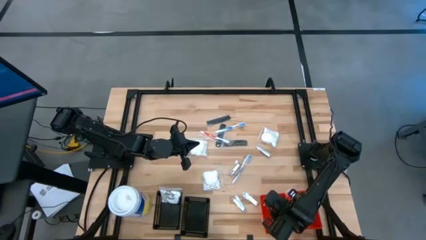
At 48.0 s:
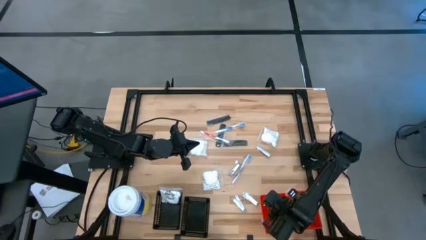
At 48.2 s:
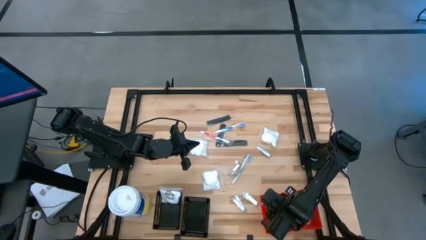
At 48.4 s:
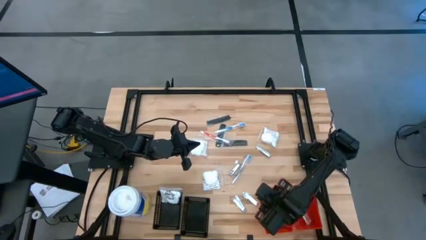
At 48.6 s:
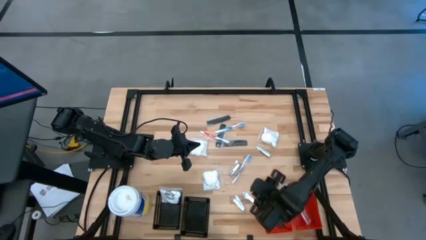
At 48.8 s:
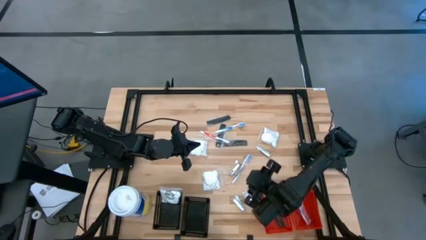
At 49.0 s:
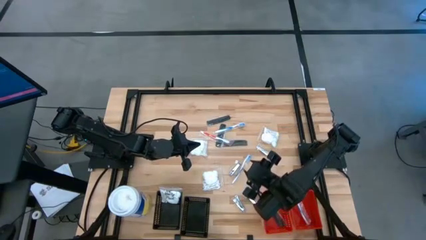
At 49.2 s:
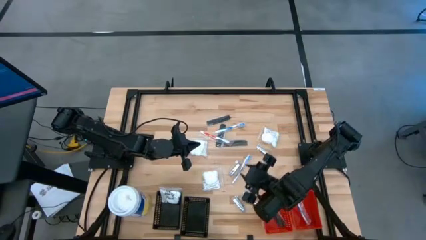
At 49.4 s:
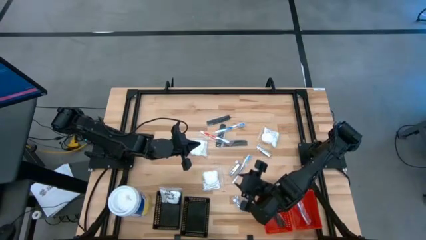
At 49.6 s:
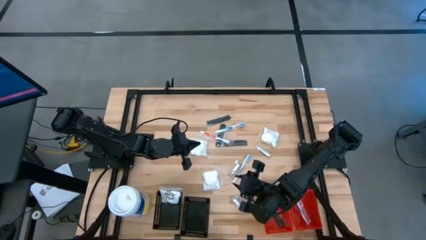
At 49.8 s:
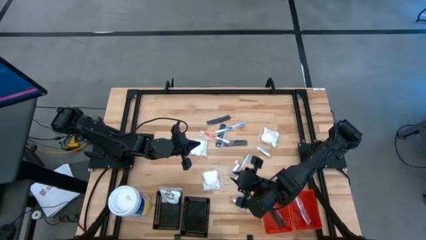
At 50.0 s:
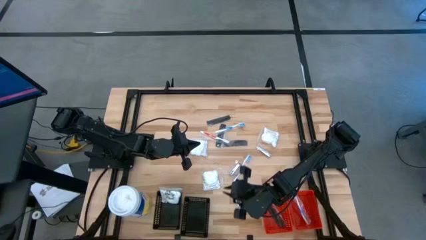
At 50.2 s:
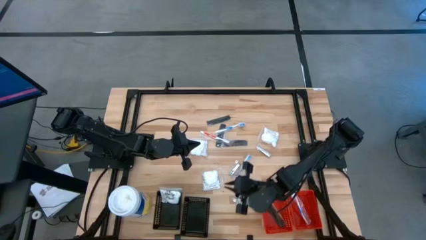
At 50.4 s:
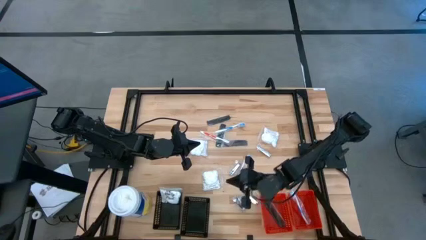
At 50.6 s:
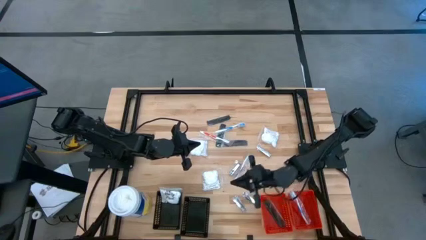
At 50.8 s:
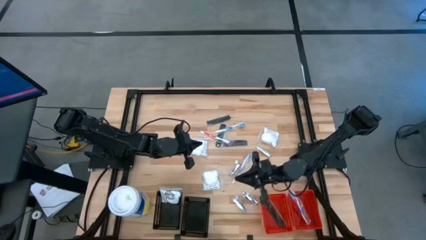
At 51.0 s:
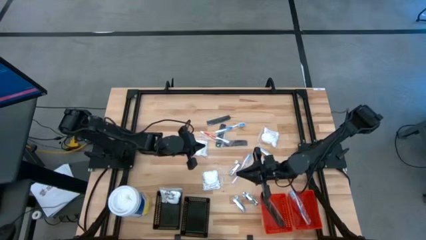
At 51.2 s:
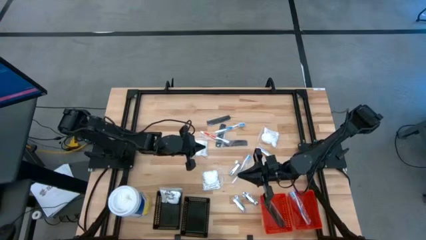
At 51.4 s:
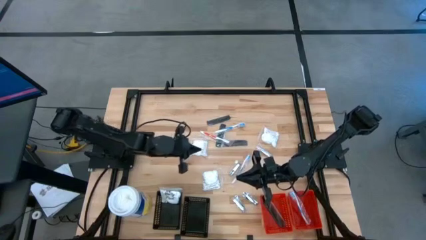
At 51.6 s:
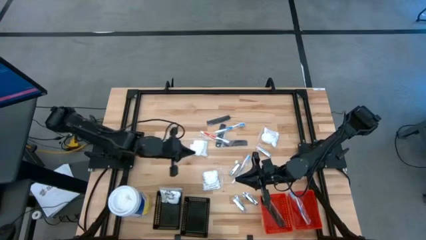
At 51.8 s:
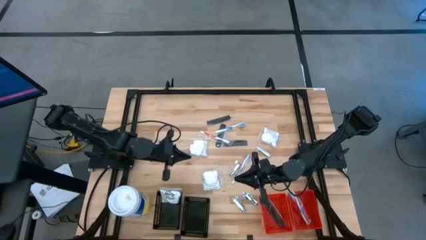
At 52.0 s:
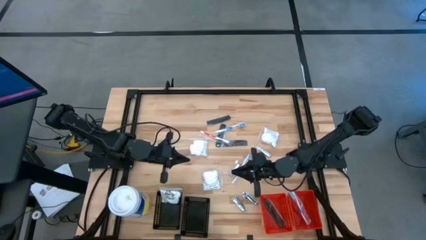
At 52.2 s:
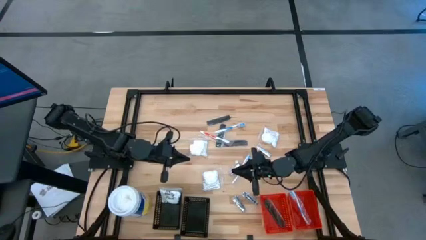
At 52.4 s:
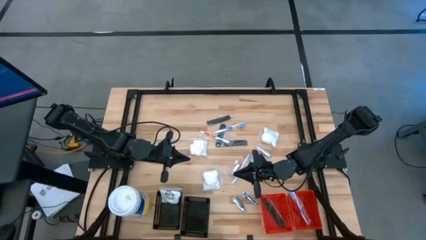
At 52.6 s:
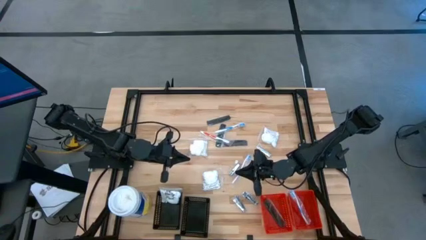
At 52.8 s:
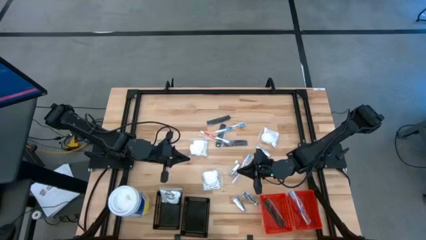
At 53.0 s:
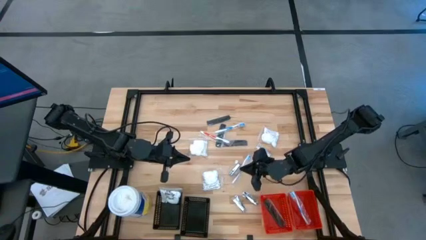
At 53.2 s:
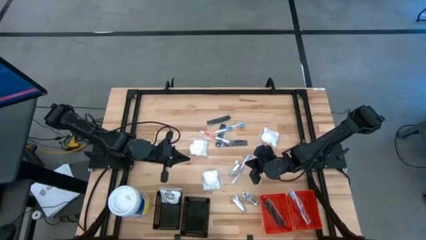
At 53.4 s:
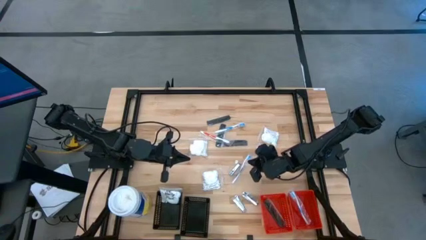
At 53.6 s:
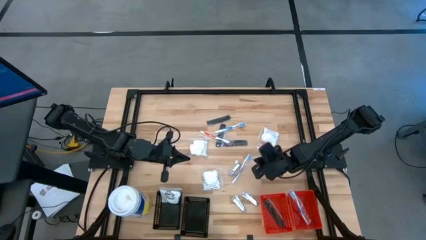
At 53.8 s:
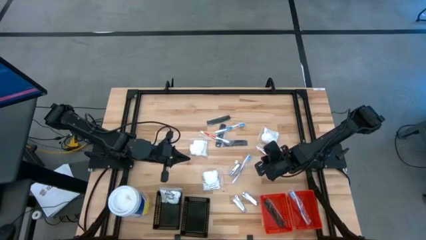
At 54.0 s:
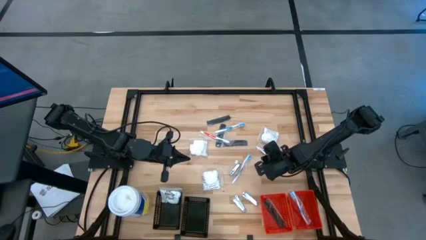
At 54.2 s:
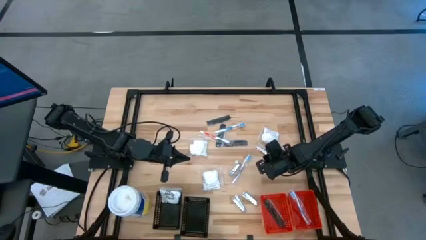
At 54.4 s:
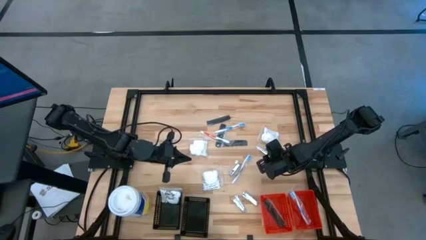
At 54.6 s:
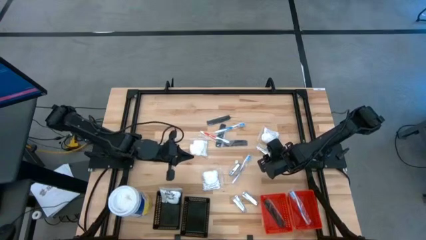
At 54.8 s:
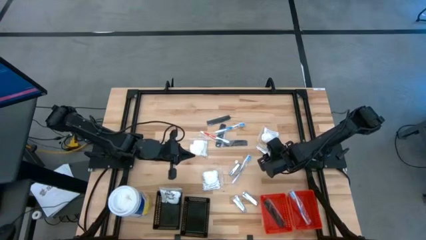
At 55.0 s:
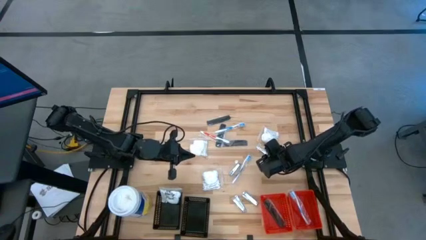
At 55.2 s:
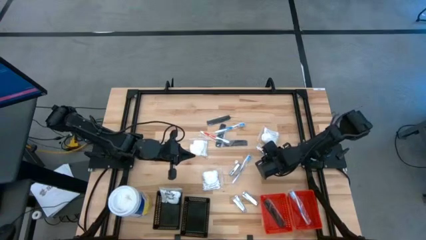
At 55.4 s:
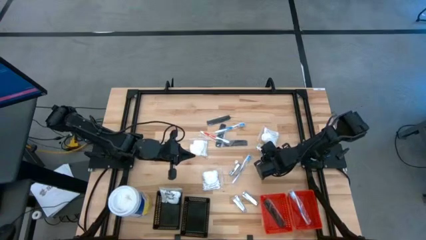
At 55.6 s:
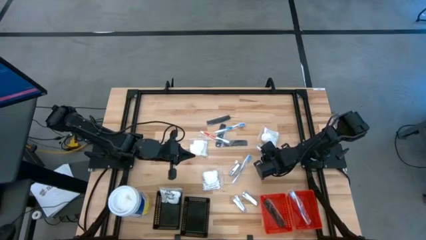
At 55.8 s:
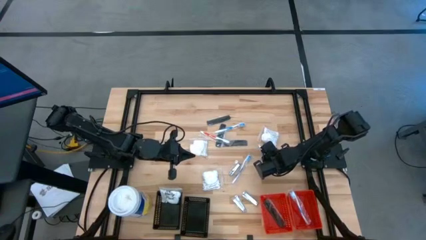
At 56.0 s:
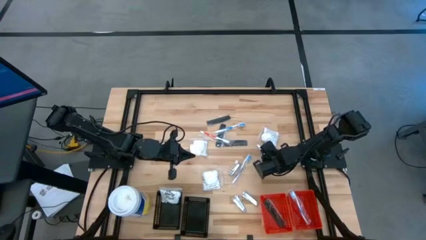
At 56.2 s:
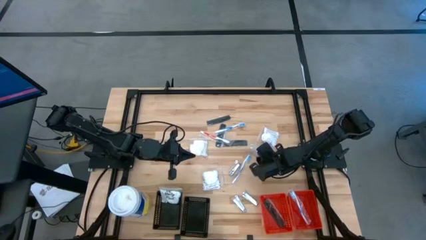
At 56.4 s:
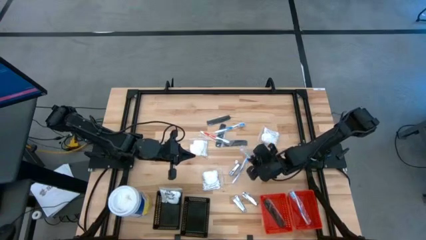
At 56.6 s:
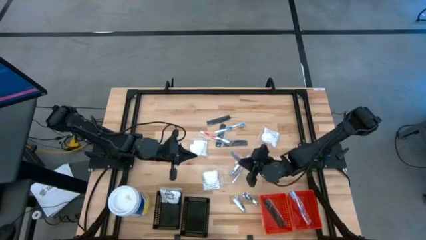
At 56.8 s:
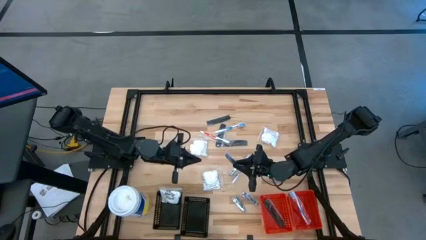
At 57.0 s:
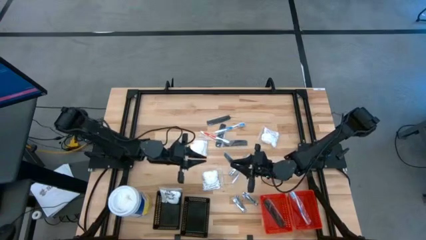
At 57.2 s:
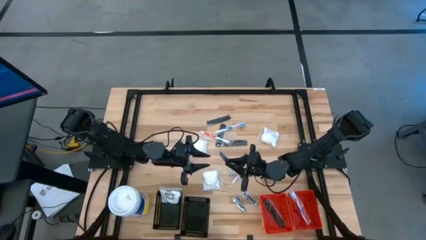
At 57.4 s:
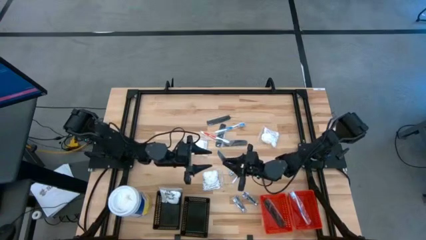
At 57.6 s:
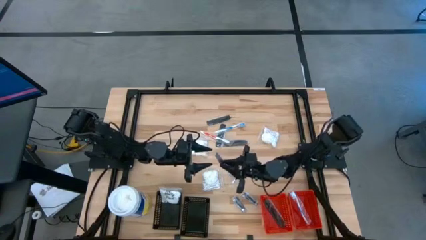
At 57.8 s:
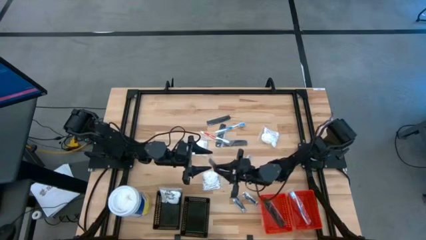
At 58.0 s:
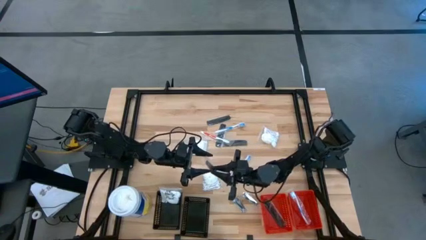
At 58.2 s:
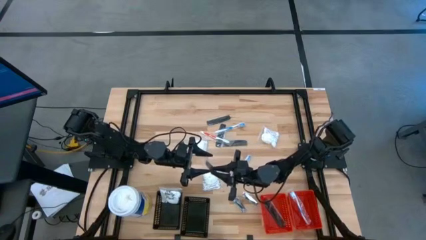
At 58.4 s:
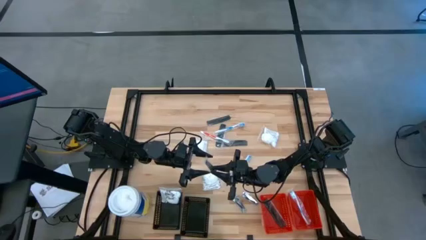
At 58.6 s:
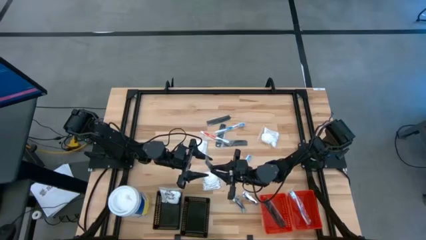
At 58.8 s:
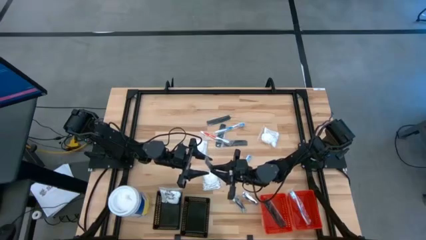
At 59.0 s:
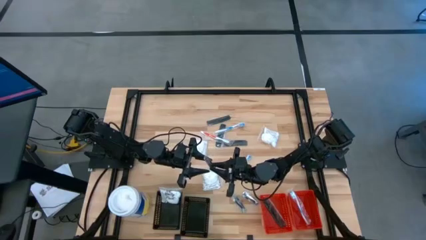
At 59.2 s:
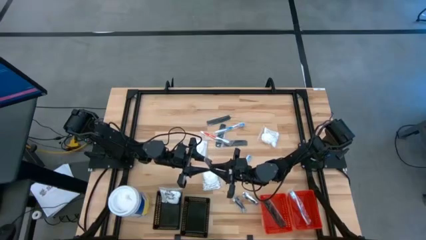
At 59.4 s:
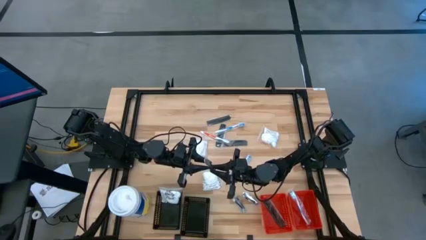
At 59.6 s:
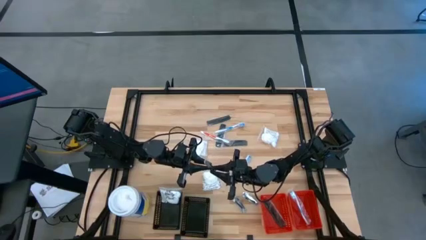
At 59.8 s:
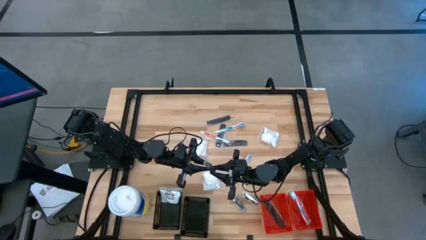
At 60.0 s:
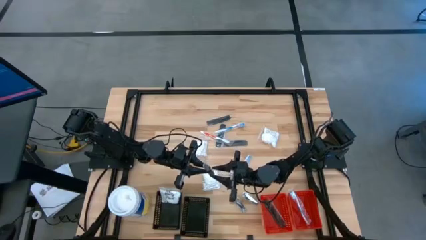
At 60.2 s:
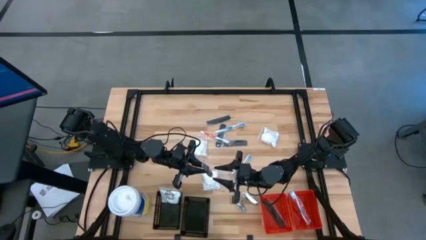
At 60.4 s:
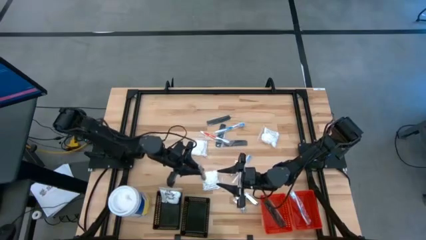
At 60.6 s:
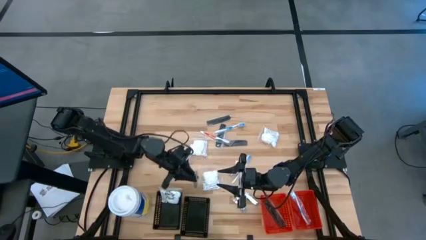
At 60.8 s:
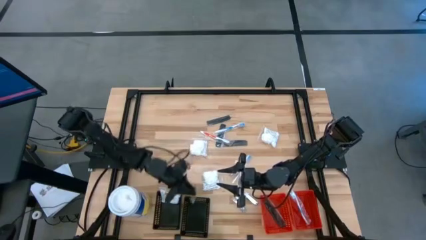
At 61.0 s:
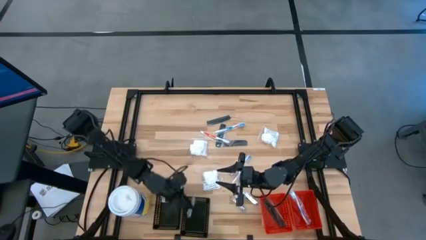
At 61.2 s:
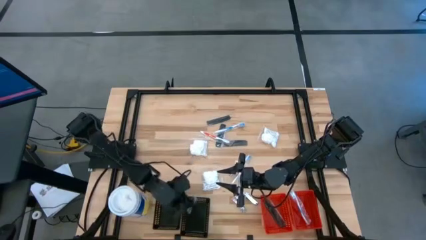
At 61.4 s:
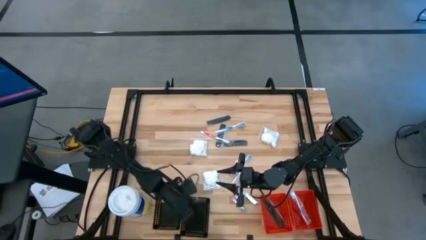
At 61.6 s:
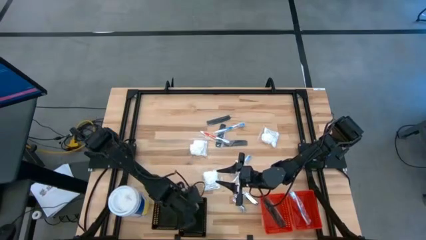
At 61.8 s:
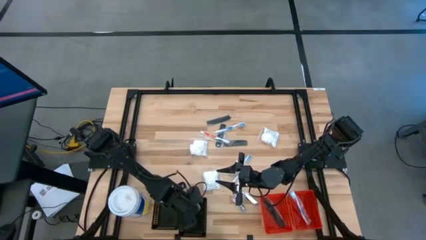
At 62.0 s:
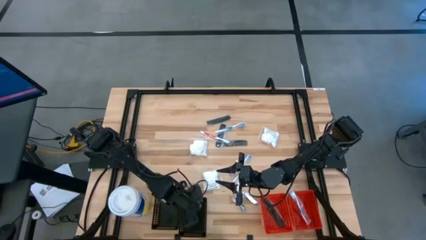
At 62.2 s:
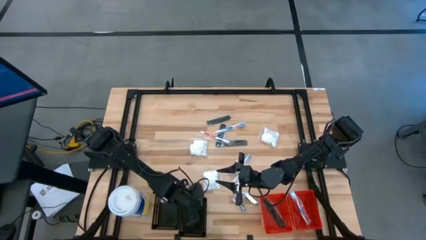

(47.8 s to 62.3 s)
Task: Pick & Place Travel size toiletries
Put the nail cutter into the right black bin
